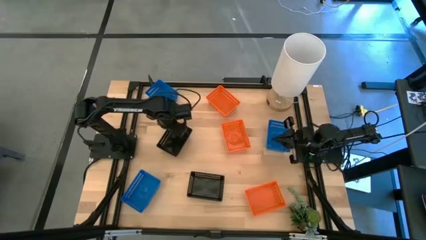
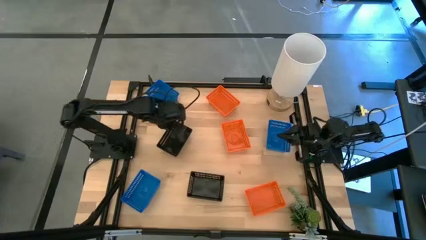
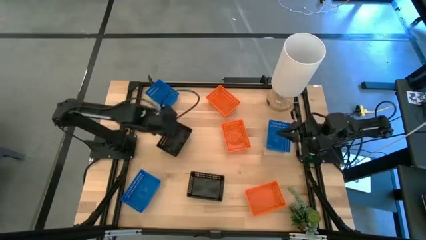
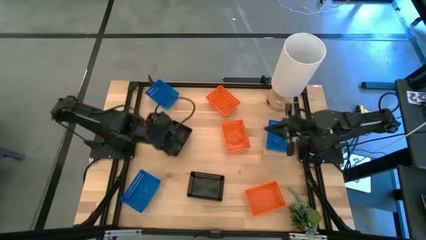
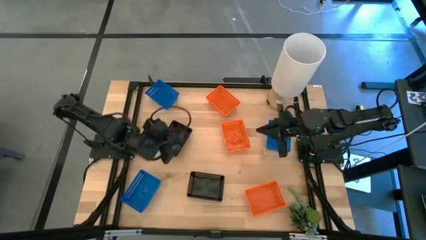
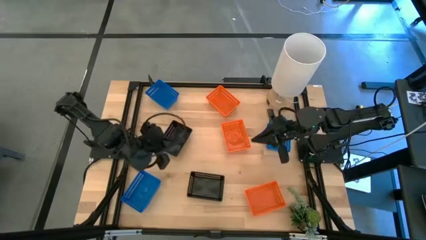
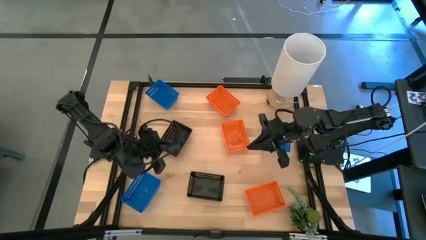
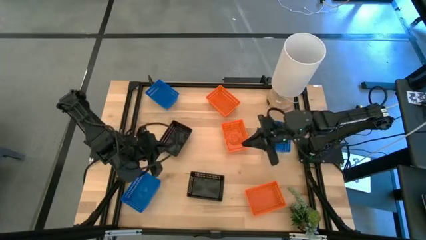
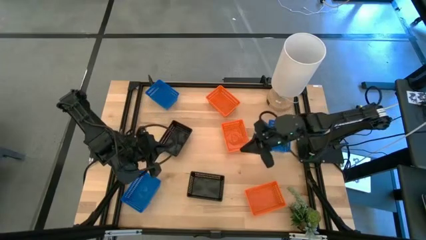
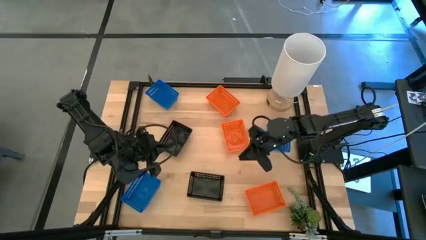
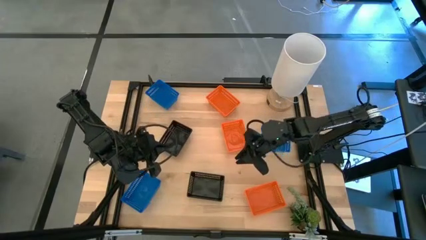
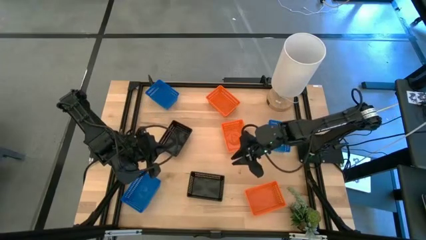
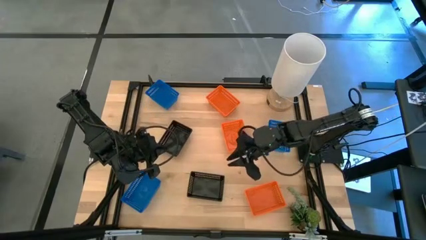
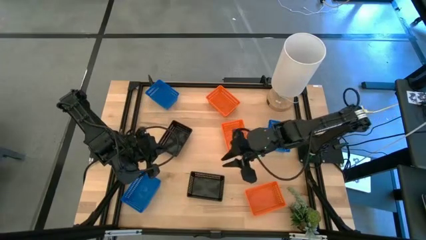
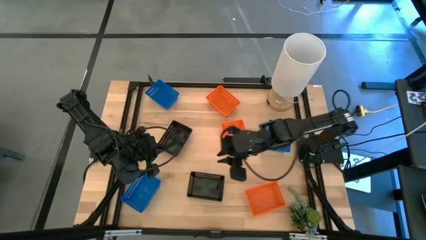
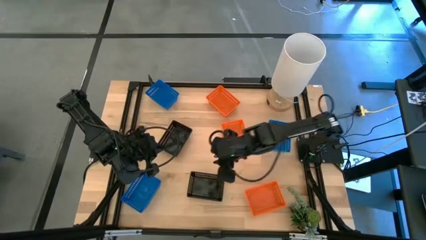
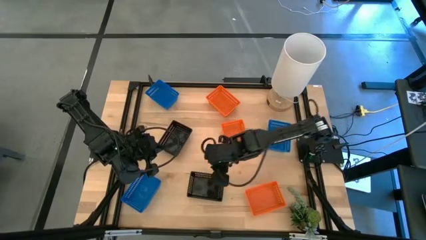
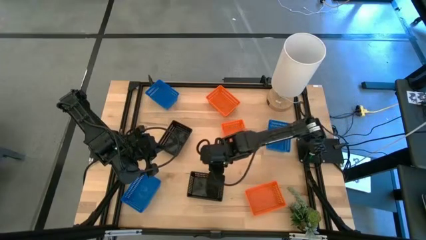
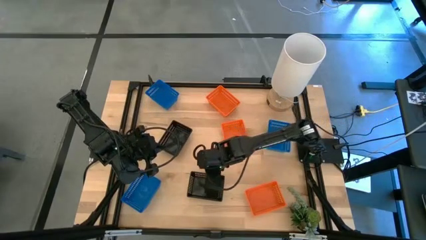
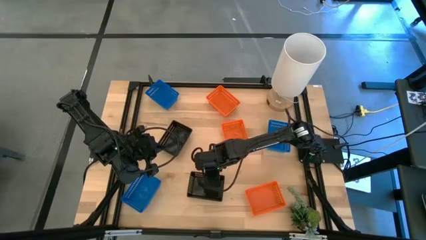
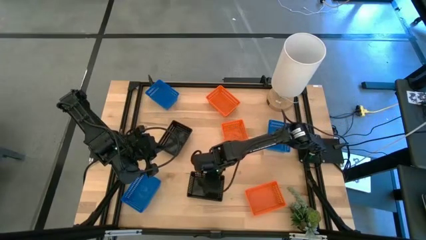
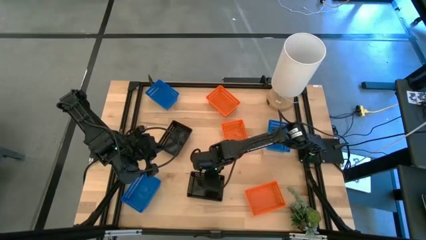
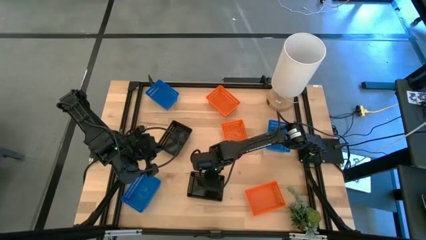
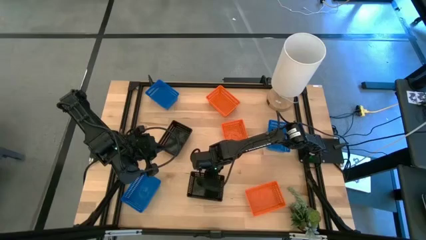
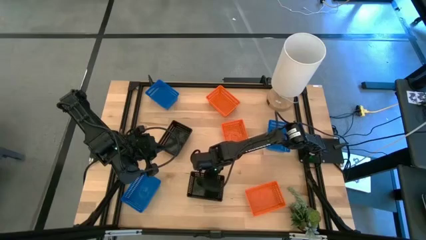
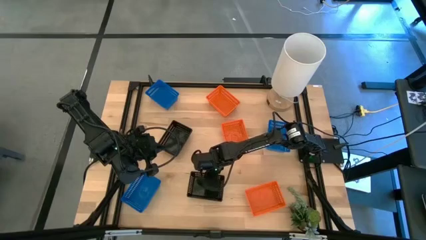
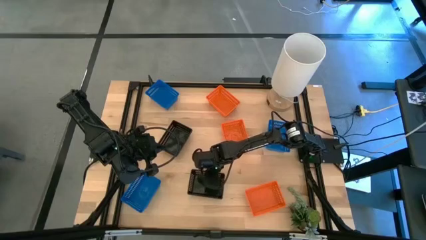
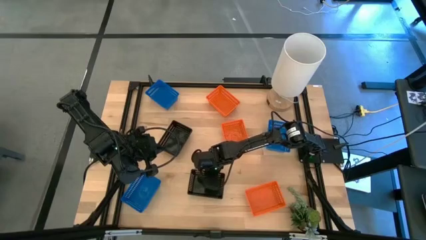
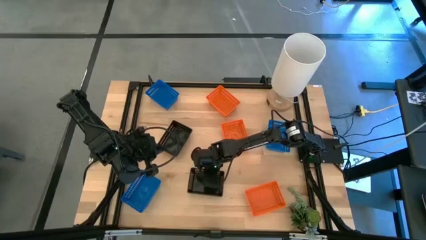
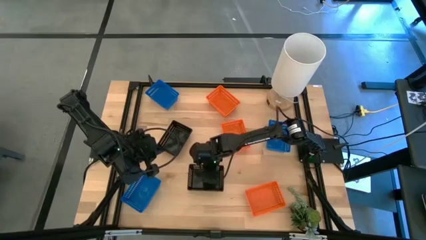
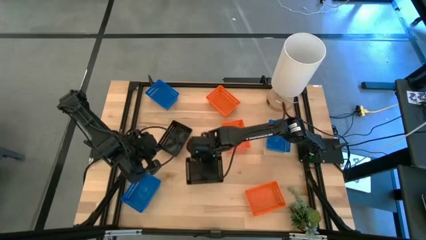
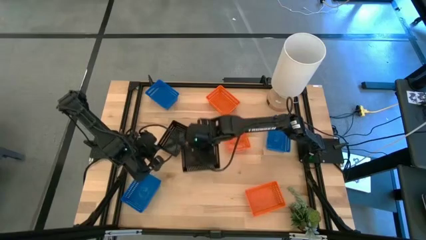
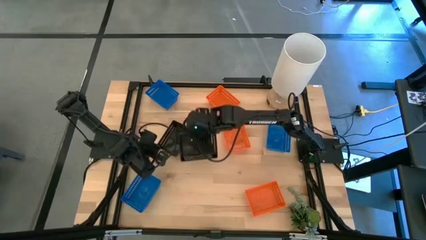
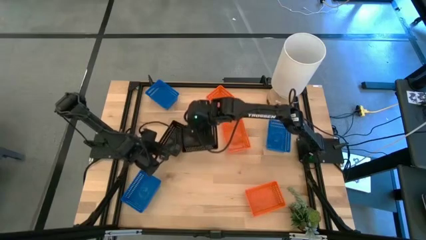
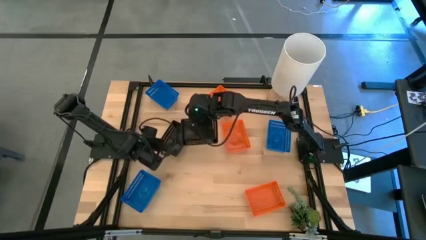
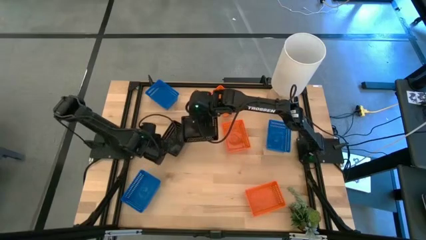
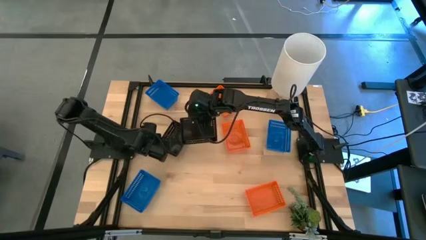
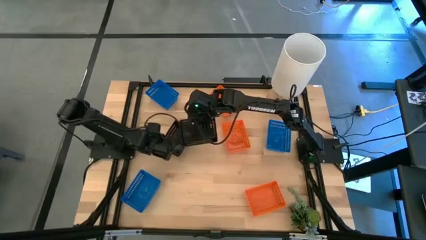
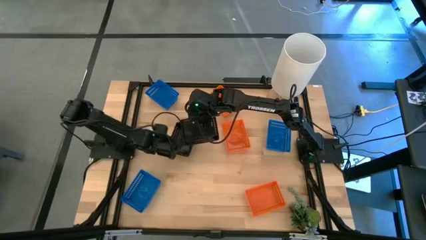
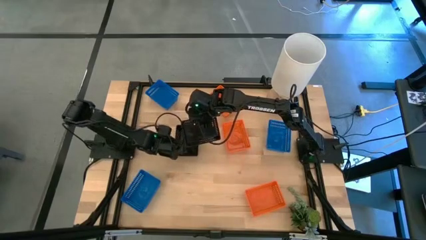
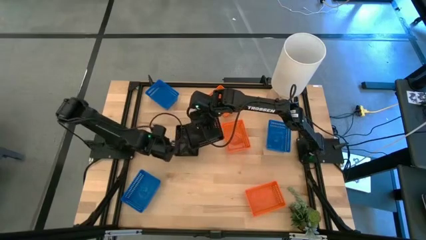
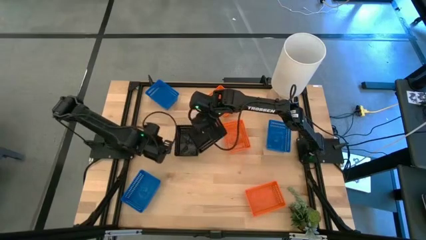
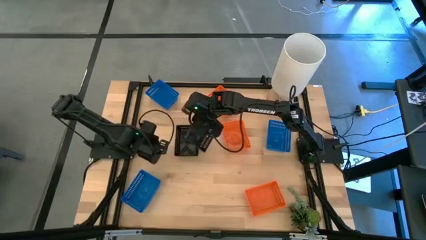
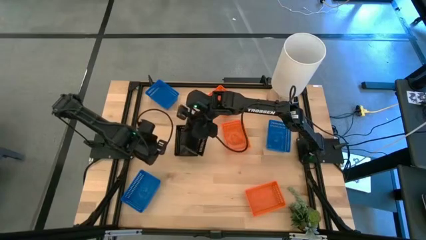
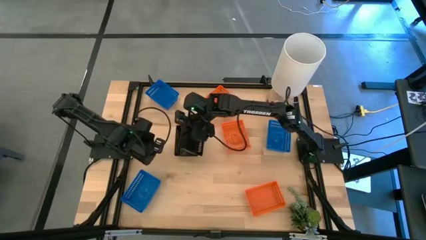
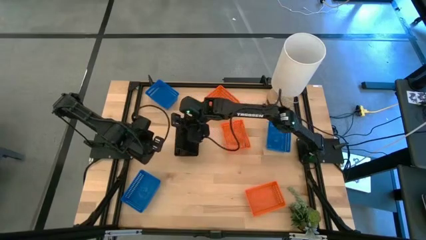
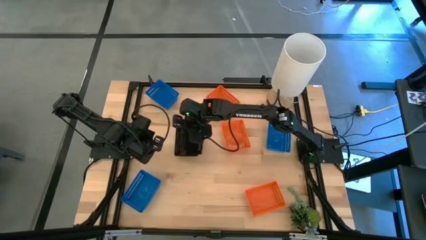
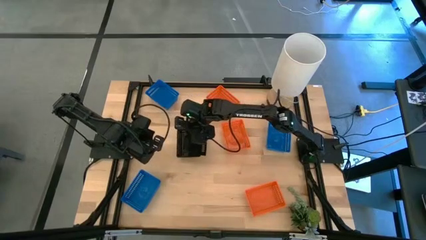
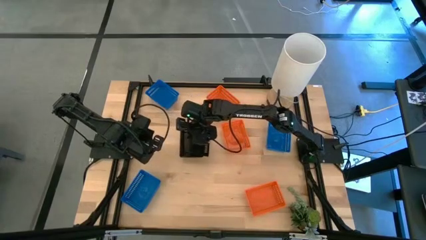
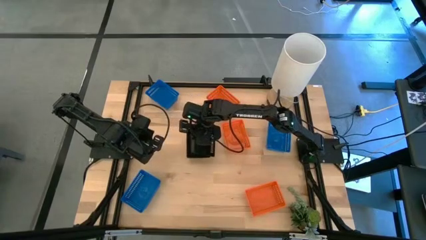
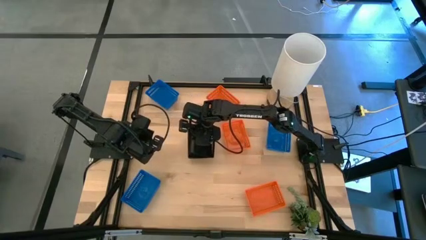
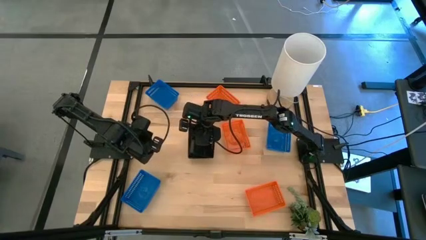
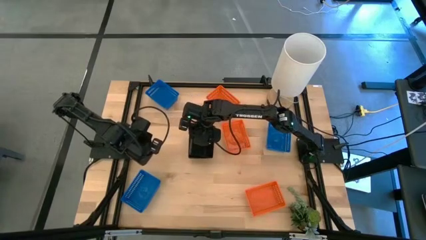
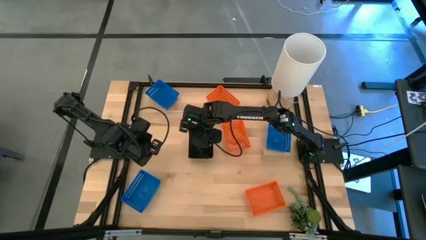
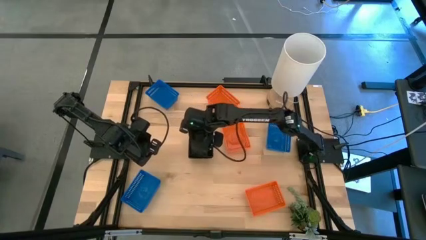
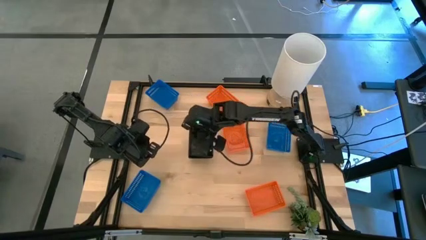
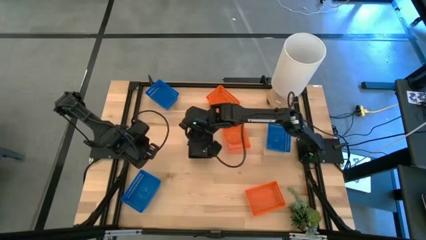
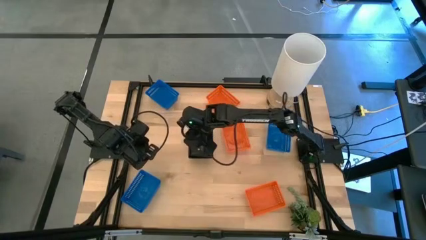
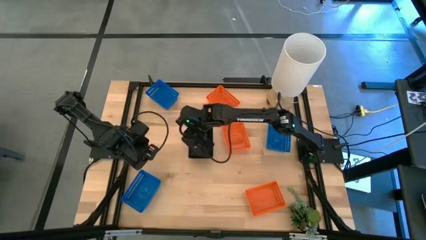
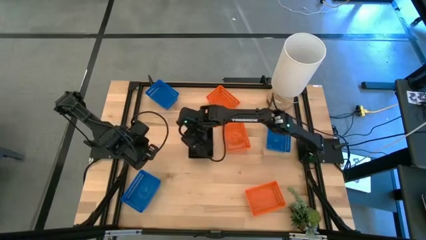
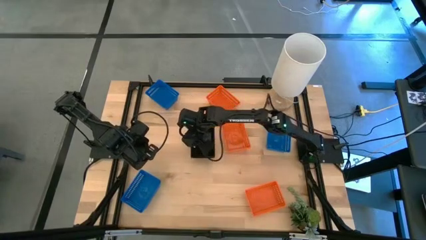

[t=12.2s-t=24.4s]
Stack the bottom black bin on the top black bin

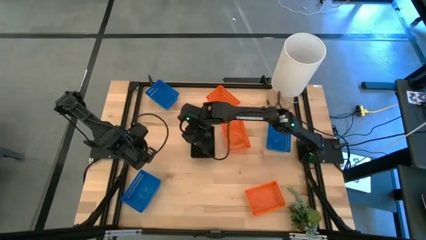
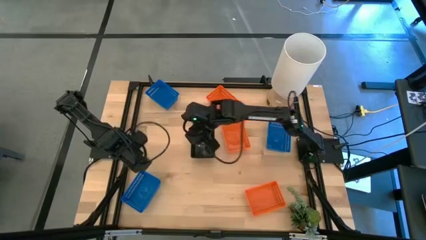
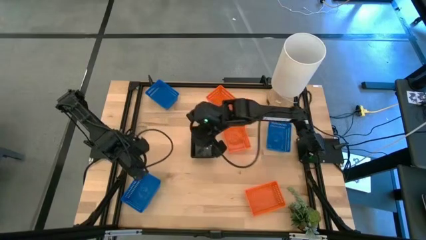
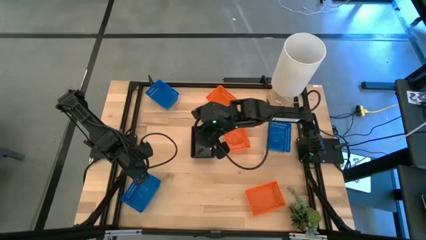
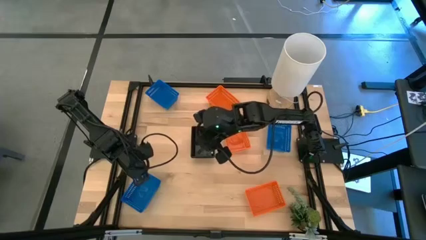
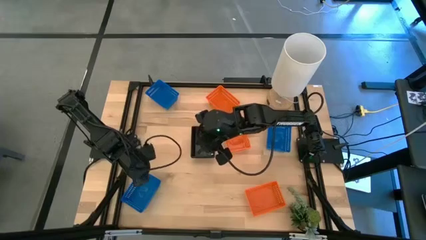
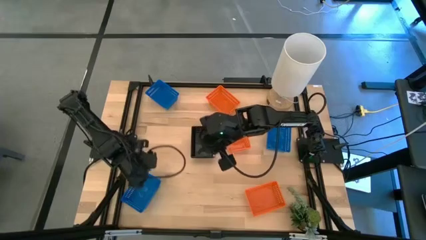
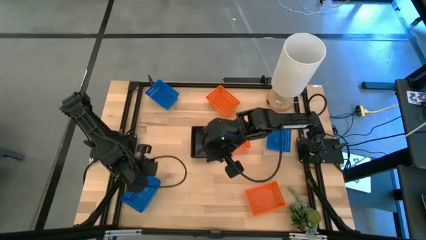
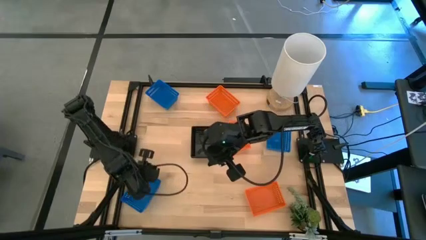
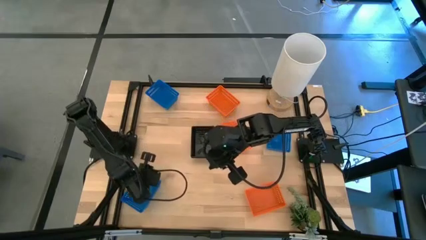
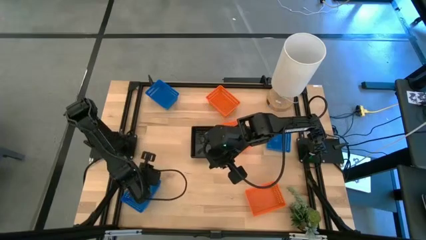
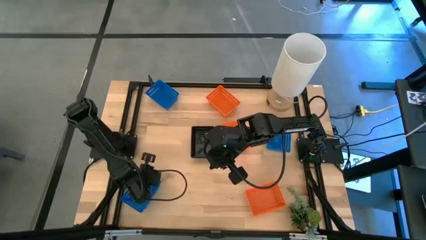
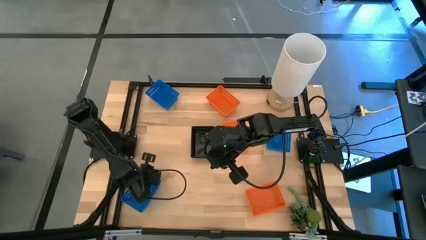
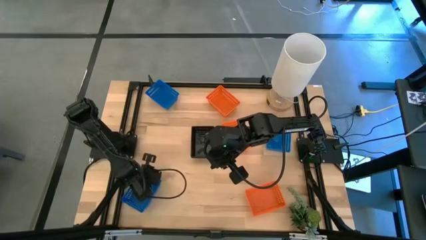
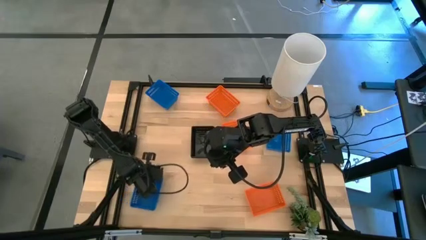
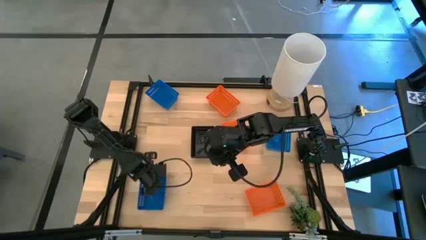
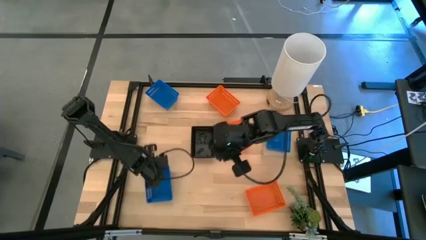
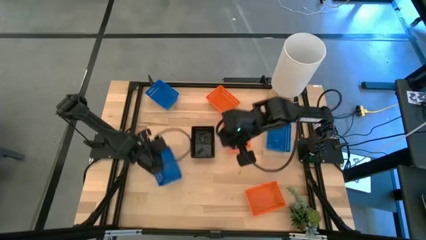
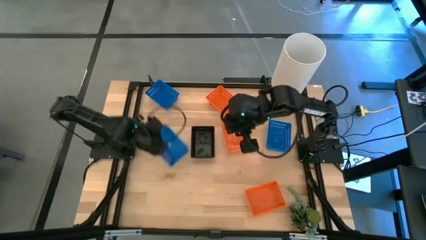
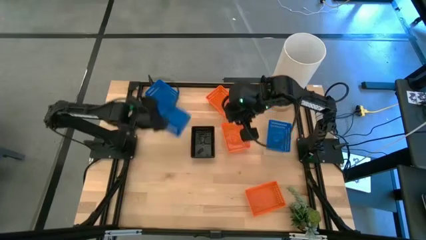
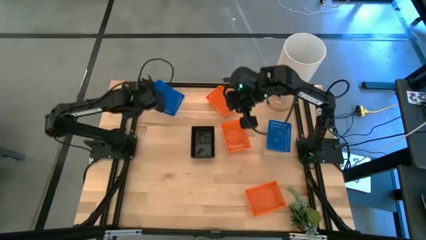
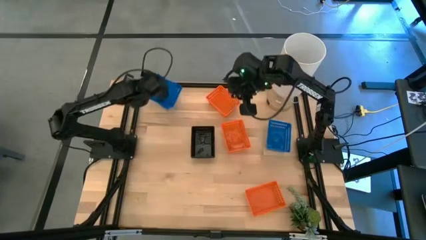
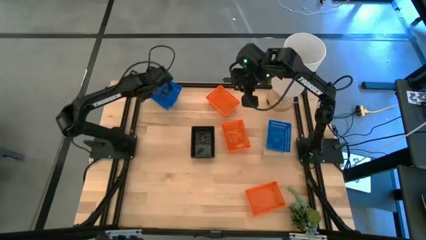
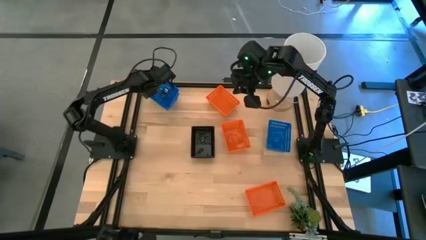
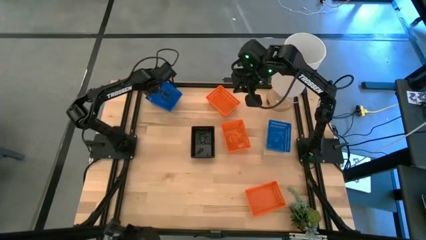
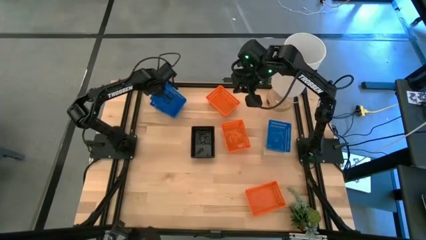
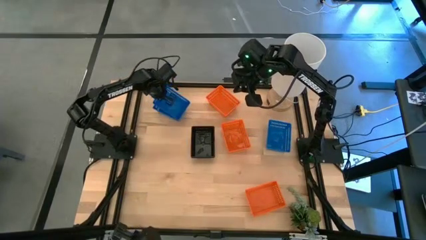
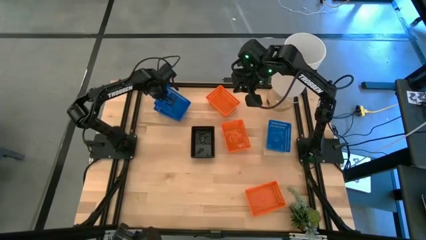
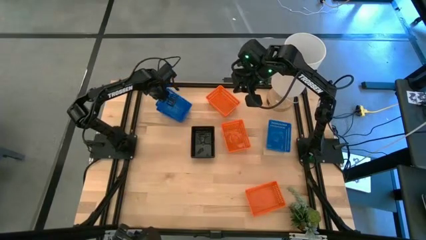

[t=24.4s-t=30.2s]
Stack the bottom left blue bin on the top left blue bin
